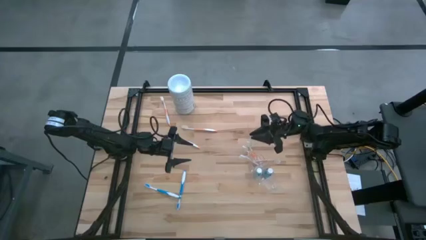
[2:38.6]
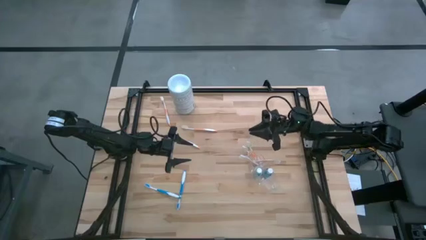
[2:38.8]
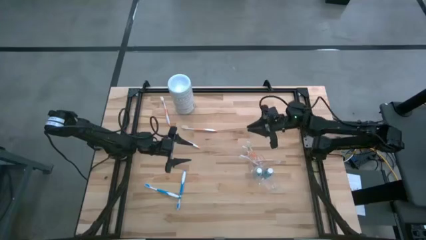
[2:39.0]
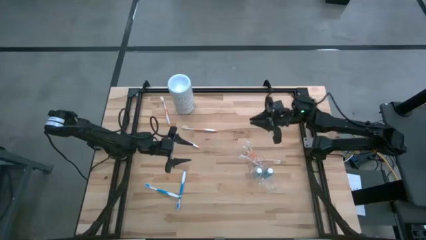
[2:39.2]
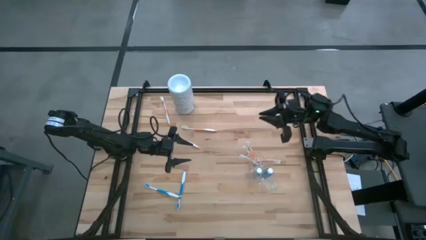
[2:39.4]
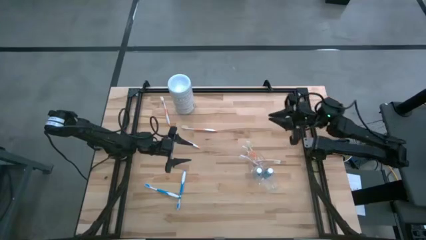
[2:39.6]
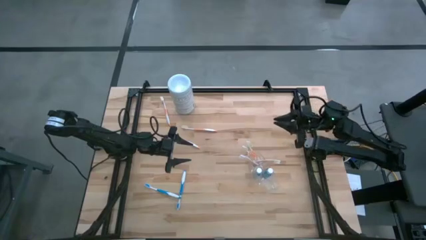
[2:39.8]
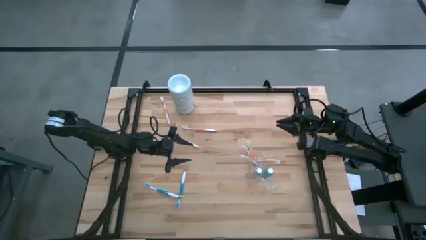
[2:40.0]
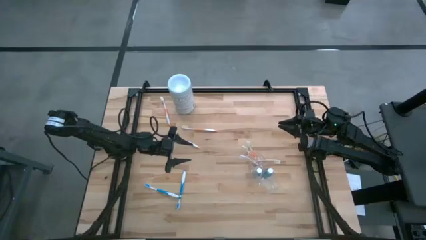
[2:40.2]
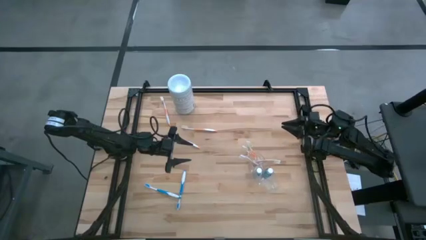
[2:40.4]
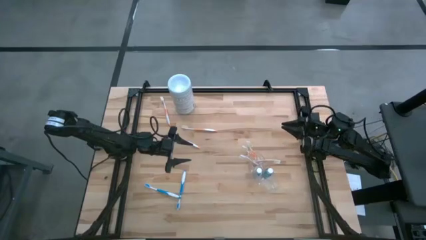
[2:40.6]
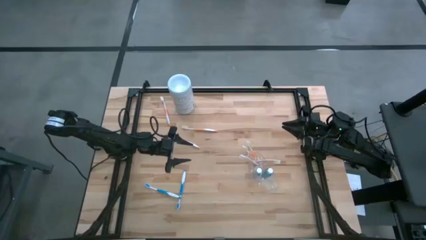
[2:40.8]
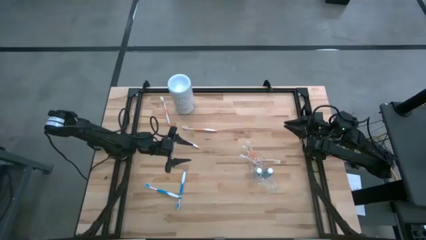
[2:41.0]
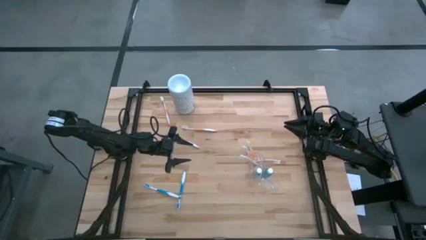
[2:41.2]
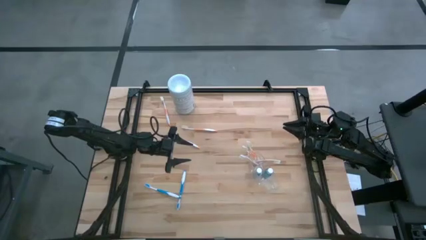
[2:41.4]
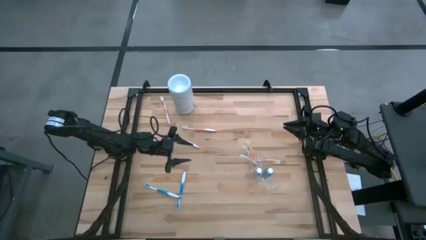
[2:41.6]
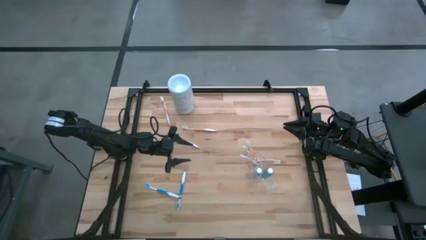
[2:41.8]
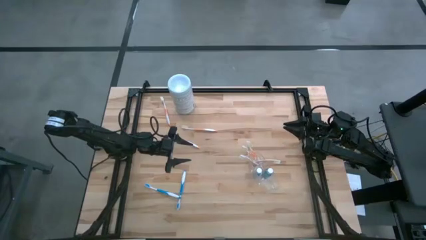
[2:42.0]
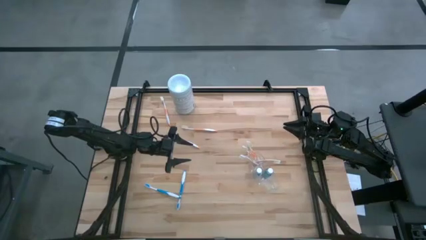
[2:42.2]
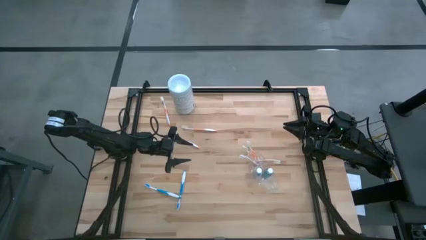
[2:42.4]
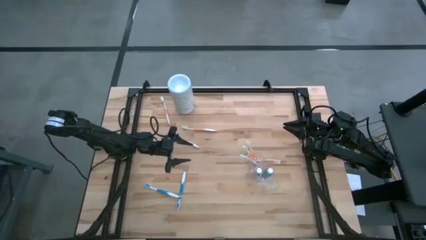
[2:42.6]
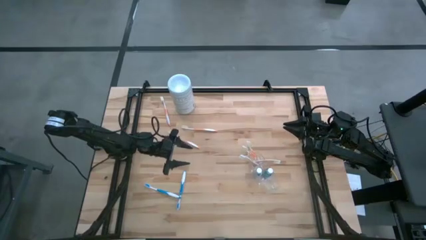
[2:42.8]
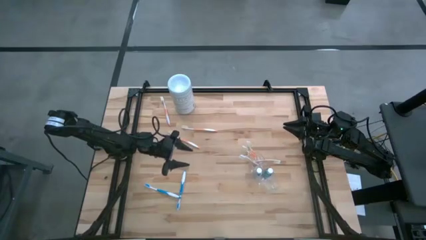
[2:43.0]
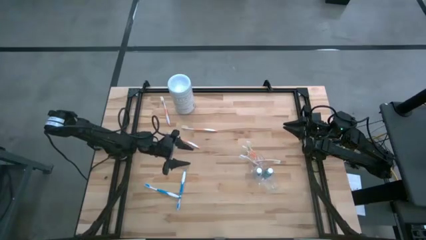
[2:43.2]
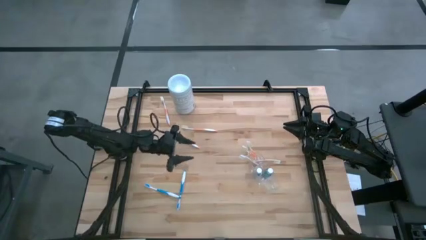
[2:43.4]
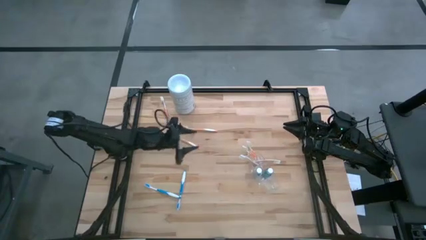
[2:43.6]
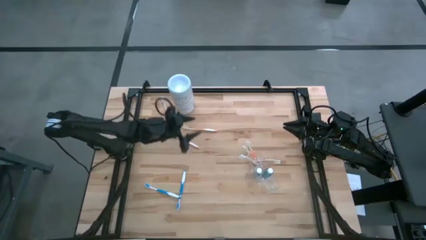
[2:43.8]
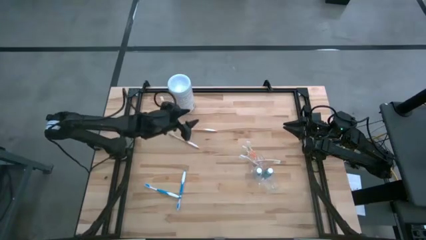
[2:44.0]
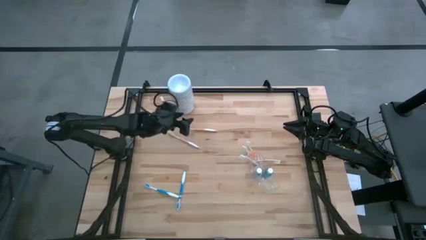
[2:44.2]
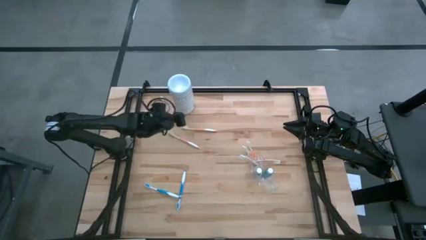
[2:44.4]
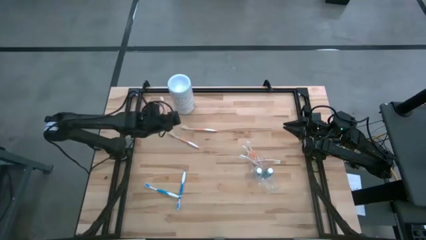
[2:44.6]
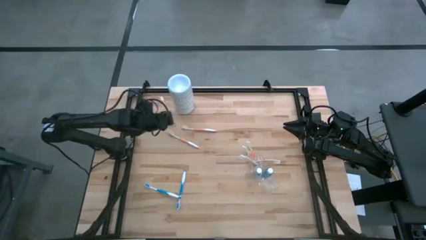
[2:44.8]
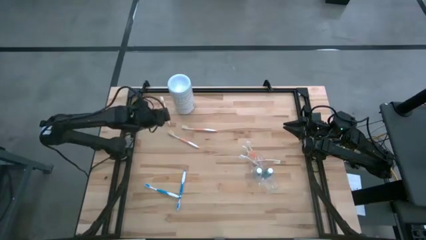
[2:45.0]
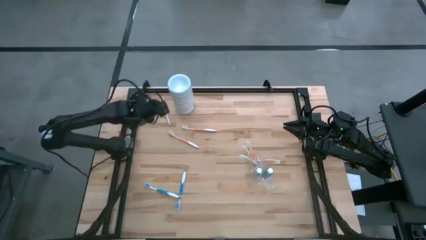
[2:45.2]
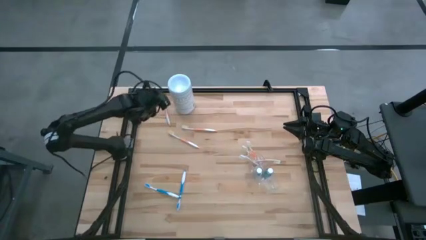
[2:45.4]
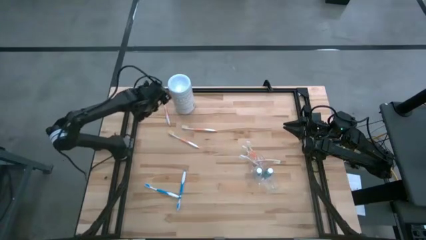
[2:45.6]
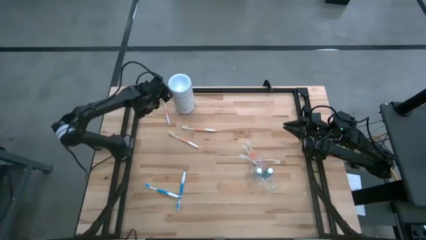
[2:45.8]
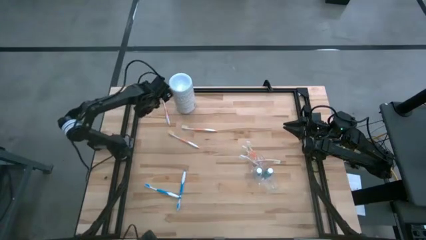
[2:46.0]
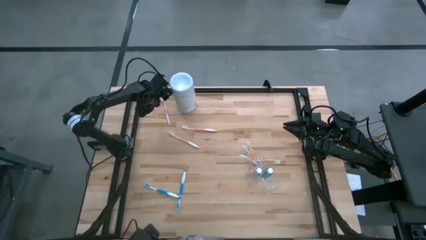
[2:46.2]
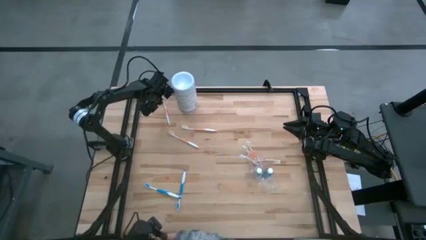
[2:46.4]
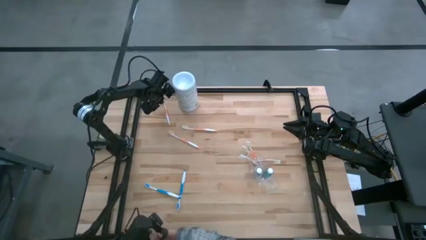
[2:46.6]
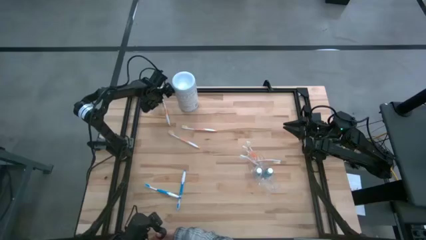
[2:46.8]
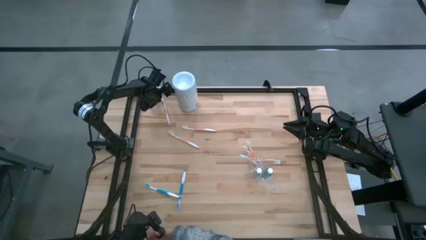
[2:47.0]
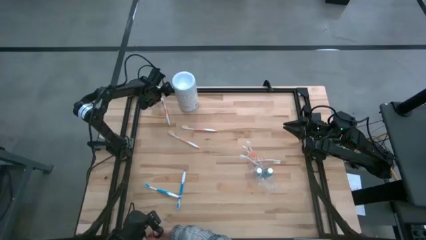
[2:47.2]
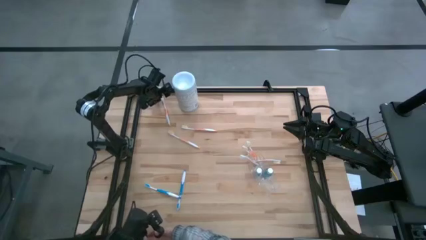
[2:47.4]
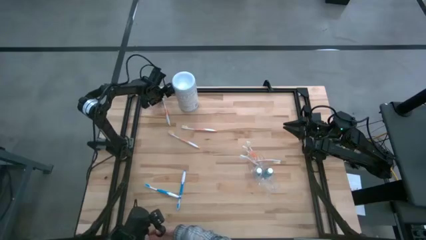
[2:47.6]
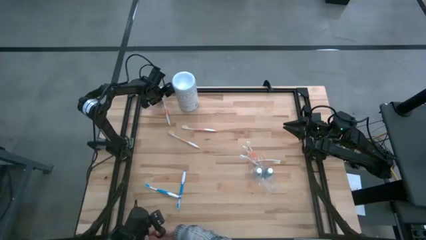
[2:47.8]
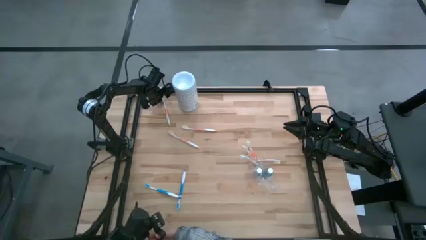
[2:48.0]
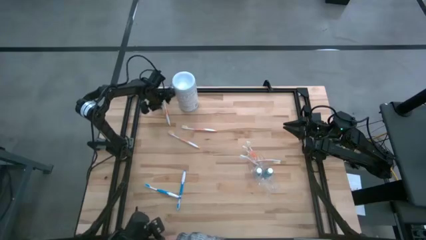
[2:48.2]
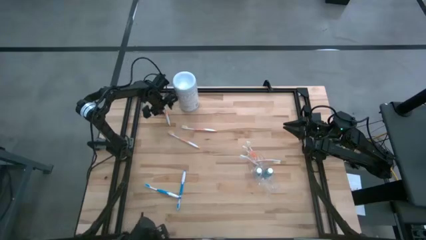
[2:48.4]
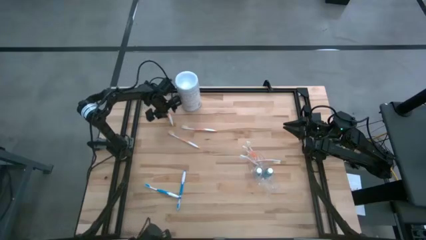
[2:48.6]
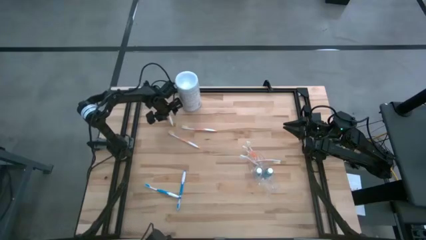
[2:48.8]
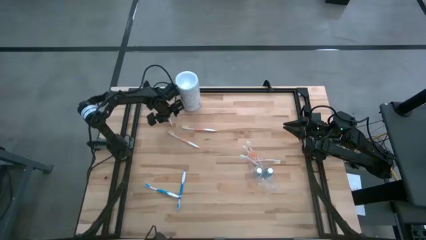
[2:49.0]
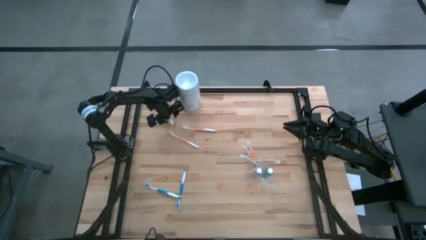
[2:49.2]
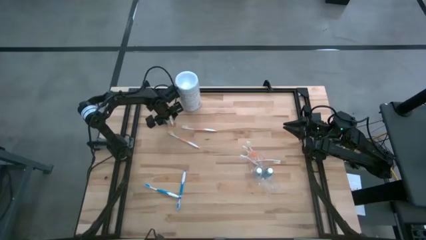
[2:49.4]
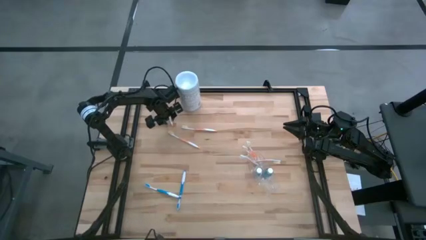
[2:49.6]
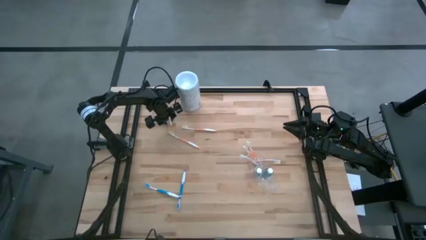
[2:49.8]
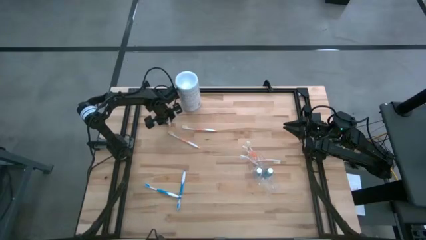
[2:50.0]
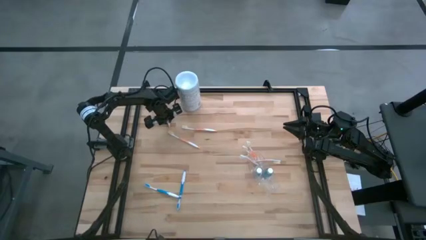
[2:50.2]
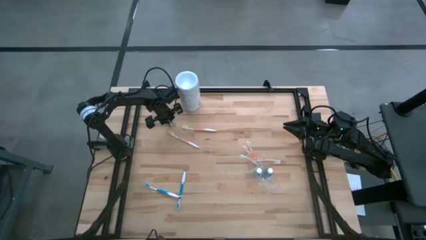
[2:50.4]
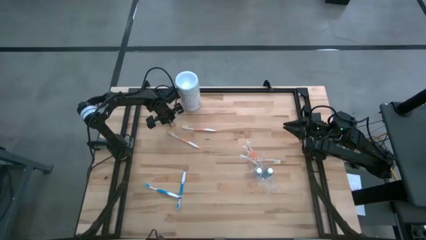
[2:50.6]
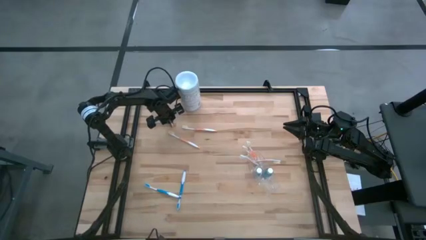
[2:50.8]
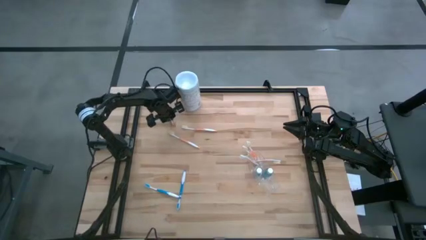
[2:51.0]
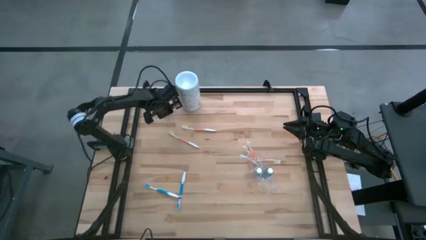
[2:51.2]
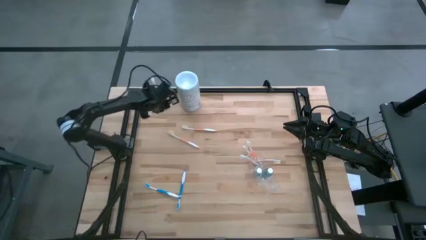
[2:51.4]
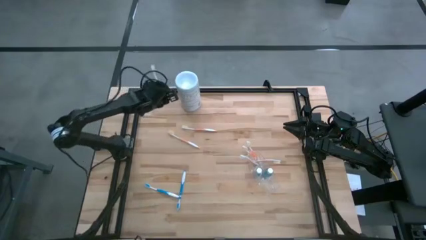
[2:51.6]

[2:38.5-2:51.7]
Task: Pick & Place toothbrushing station
Put the orange toothbrush into the top section of the transparent organizer

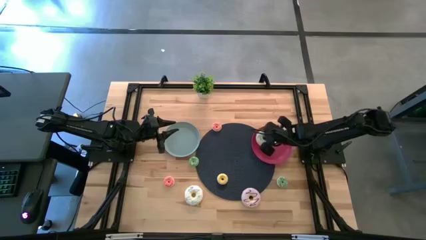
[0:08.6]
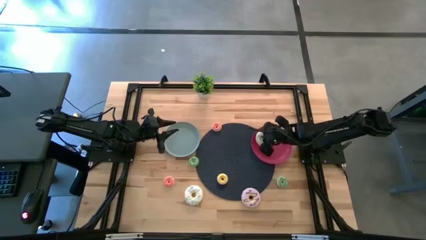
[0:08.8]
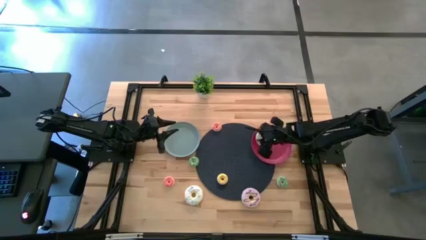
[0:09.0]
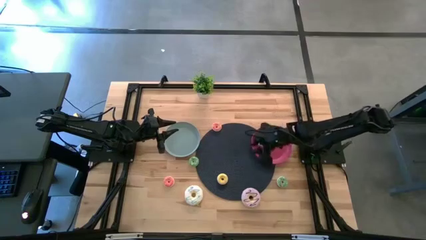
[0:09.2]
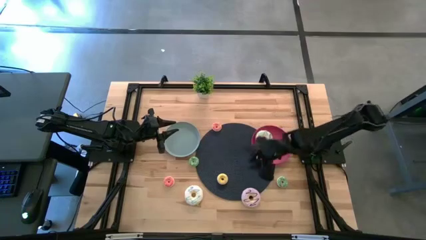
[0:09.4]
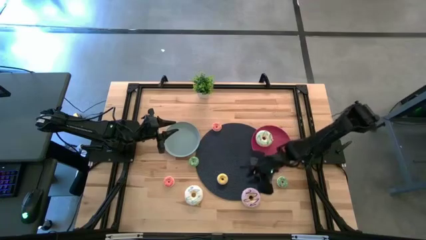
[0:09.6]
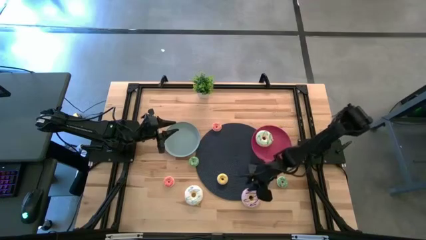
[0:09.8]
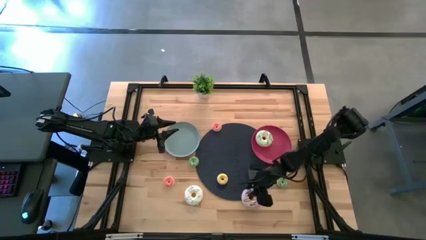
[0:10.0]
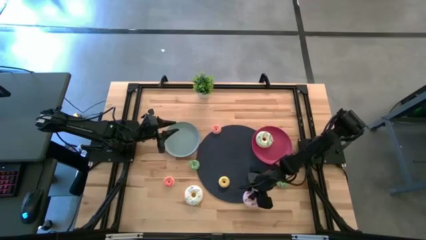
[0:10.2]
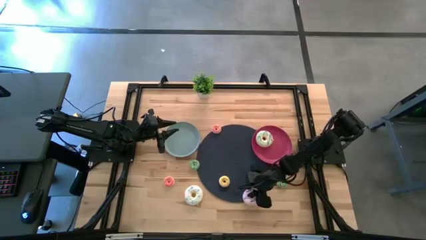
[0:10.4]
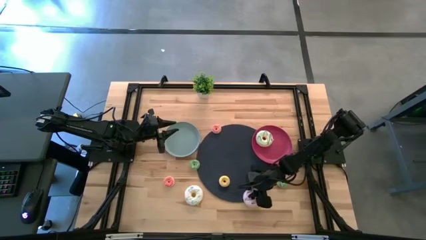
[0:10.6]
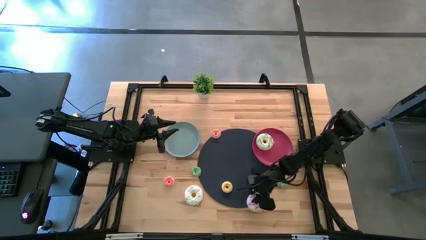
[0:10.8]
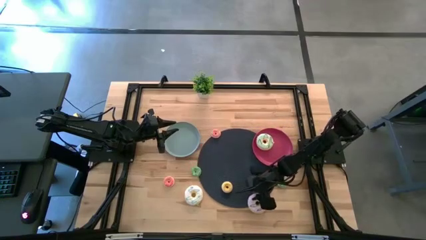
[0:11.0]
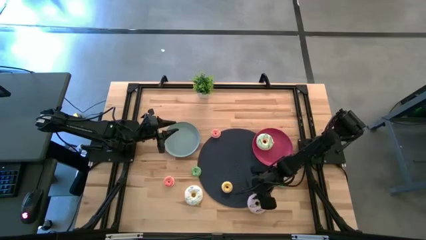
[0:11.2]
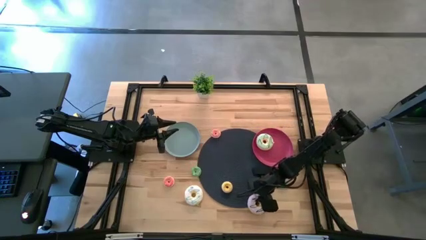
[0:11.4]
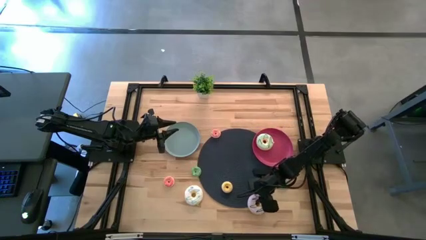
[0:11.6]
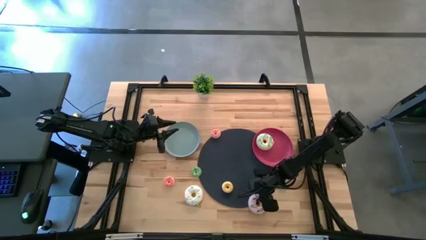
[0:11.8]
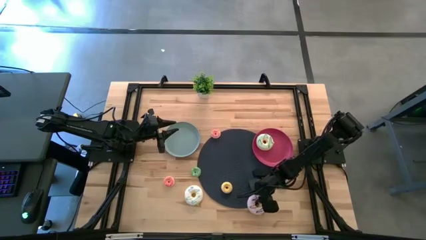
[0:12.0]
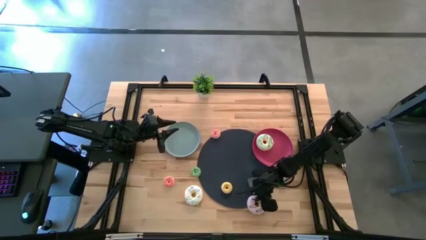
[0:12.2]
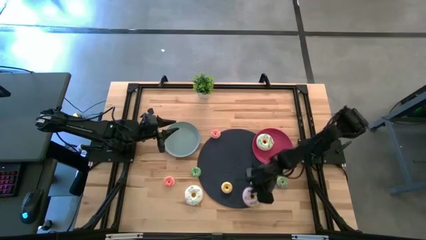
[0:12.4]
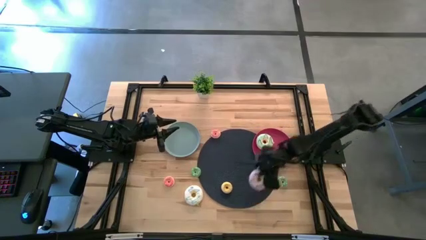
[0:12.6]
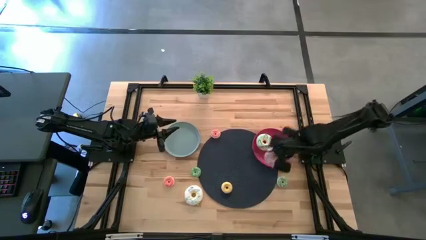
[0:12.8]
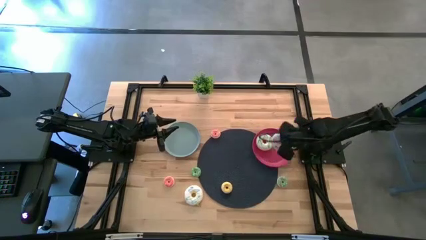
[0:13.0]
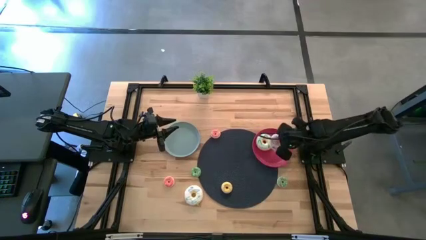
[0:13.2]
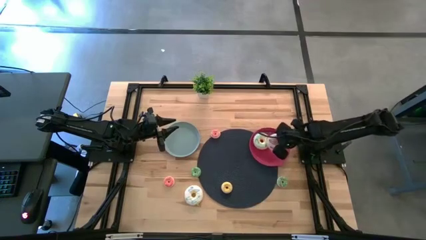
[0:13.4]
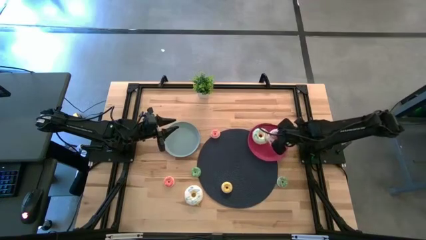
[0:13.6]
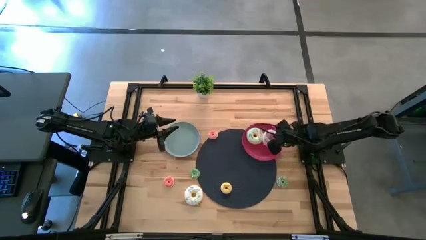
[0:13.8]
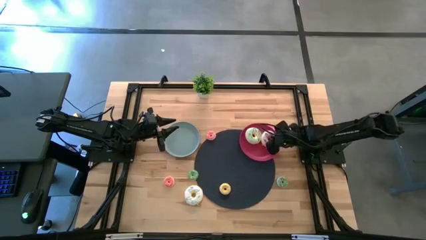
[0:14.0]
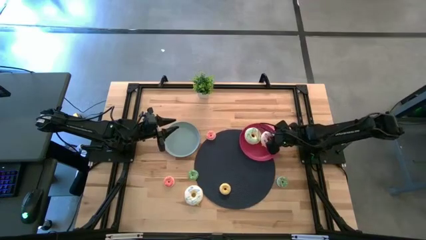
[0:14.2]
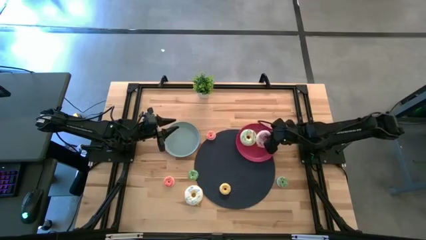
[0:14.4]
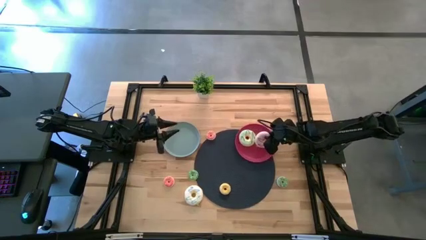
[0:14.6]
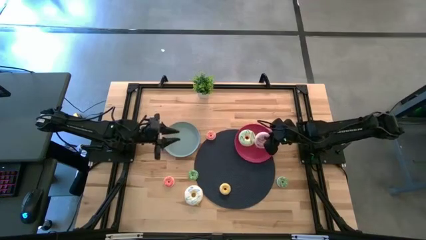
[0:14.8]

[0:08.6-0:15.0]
Task: Pick & Place donuts
Put the large purple donut on the red plate
